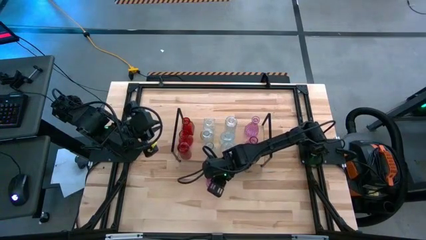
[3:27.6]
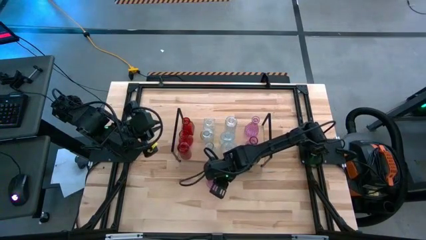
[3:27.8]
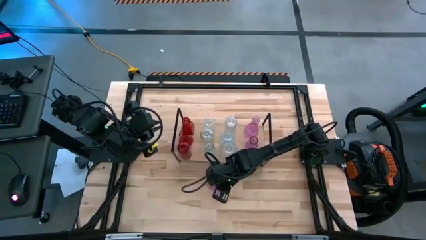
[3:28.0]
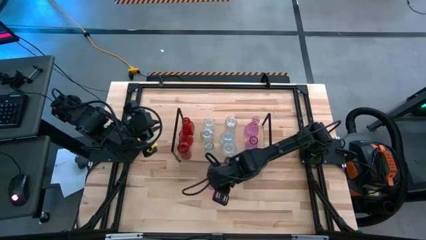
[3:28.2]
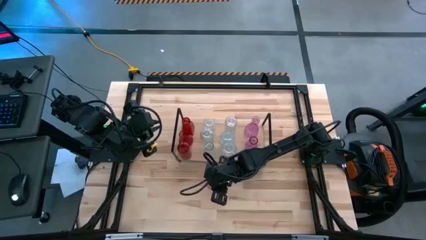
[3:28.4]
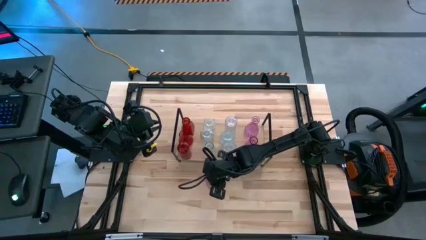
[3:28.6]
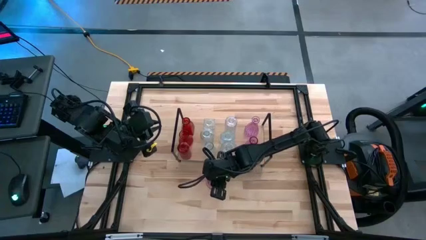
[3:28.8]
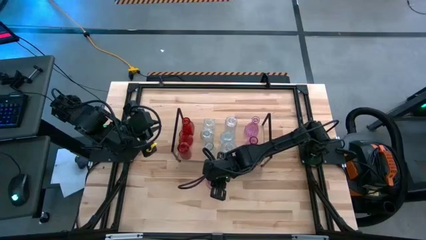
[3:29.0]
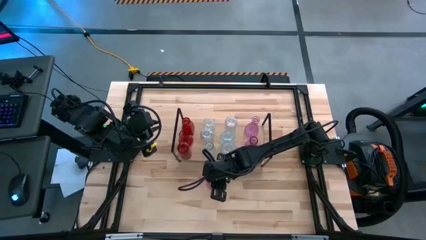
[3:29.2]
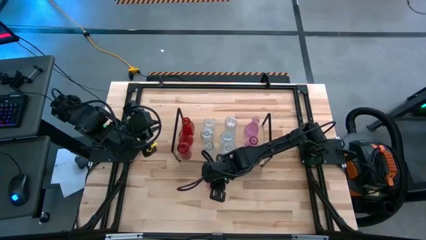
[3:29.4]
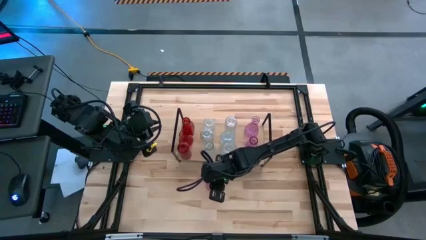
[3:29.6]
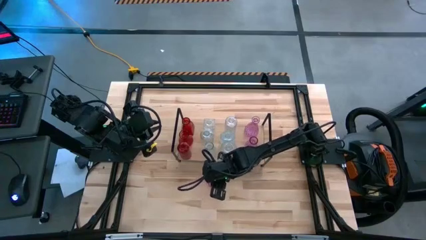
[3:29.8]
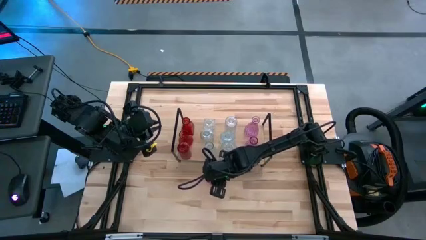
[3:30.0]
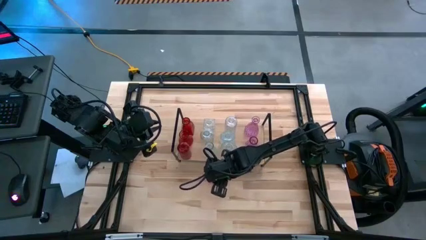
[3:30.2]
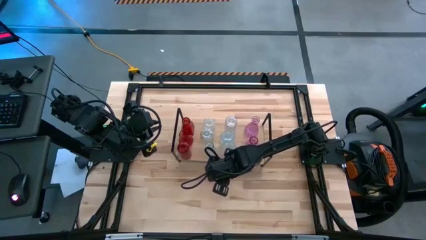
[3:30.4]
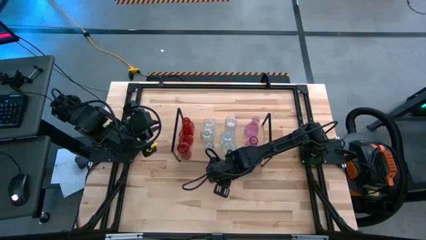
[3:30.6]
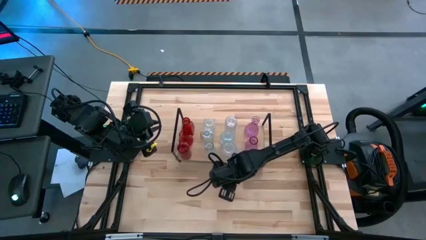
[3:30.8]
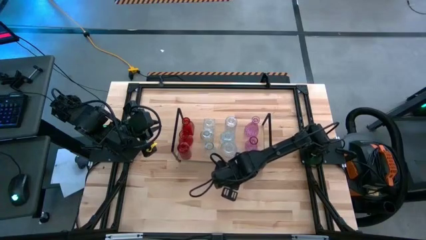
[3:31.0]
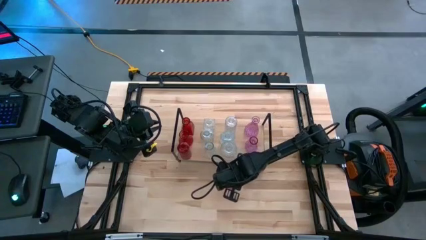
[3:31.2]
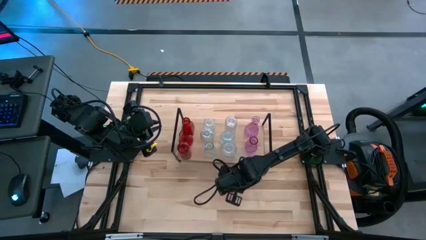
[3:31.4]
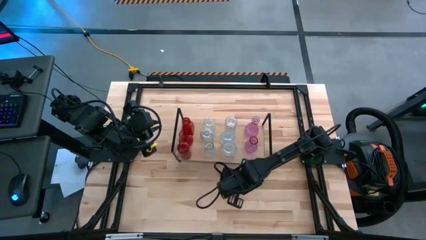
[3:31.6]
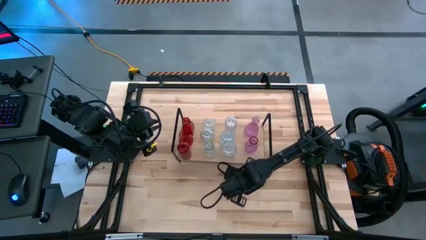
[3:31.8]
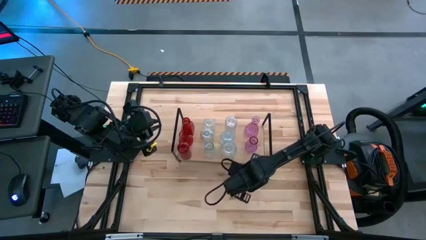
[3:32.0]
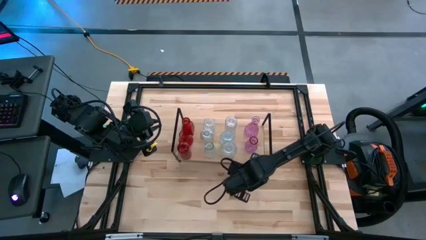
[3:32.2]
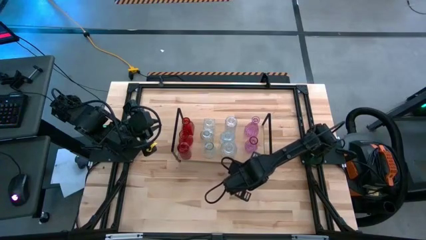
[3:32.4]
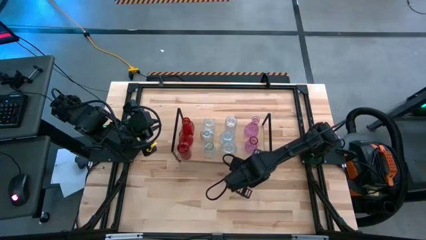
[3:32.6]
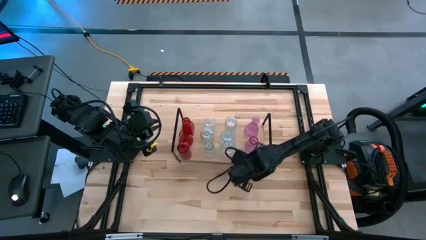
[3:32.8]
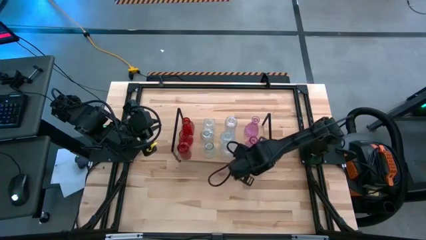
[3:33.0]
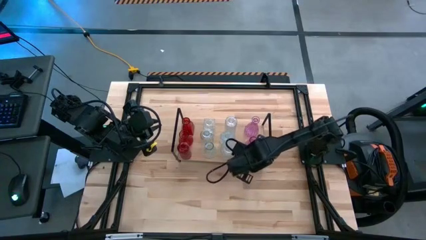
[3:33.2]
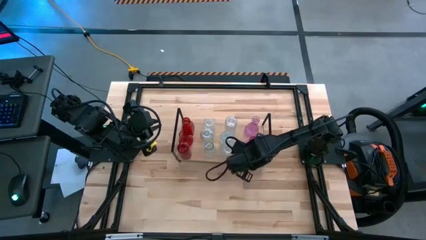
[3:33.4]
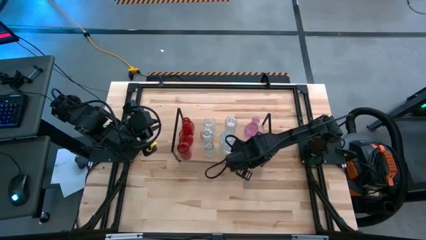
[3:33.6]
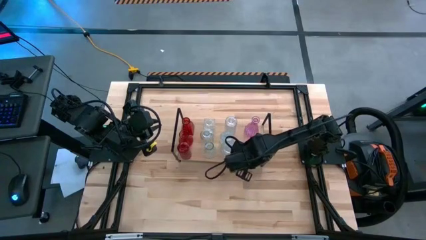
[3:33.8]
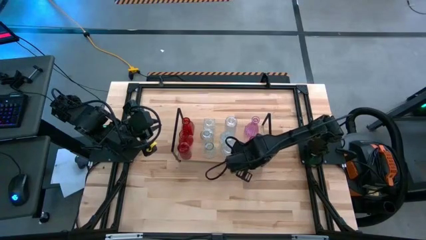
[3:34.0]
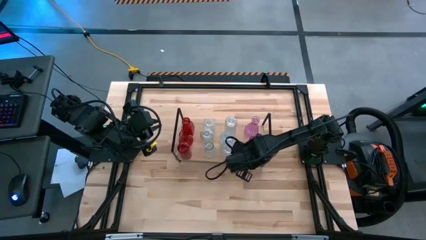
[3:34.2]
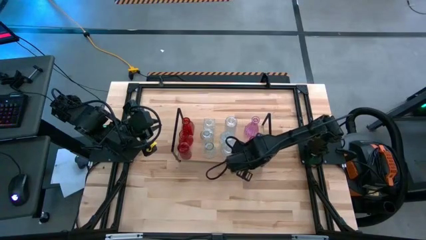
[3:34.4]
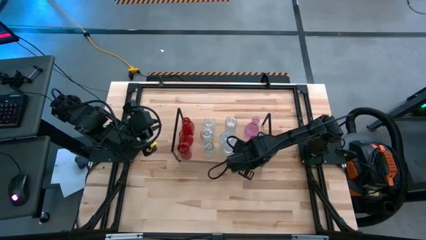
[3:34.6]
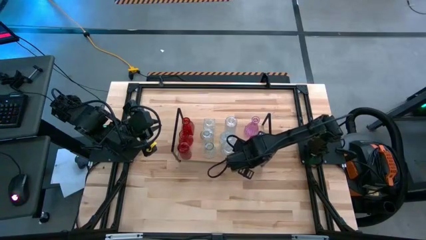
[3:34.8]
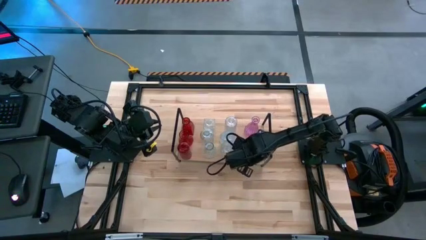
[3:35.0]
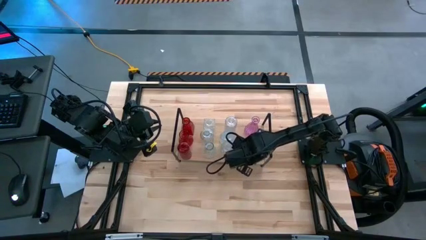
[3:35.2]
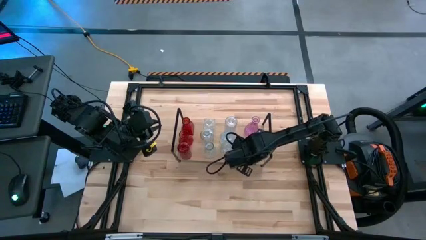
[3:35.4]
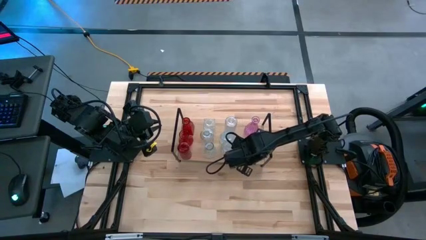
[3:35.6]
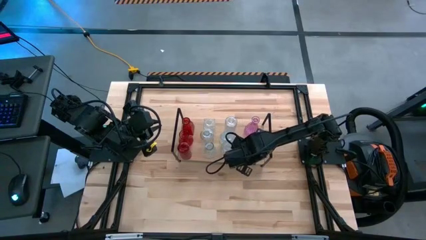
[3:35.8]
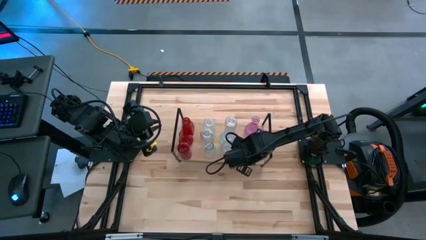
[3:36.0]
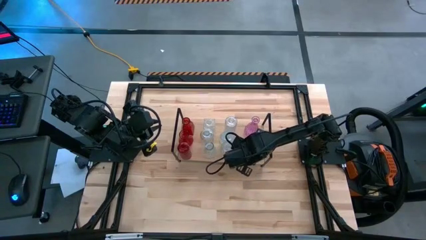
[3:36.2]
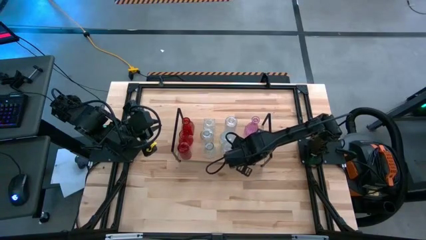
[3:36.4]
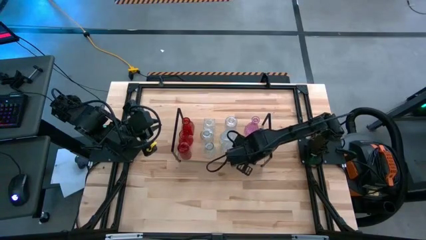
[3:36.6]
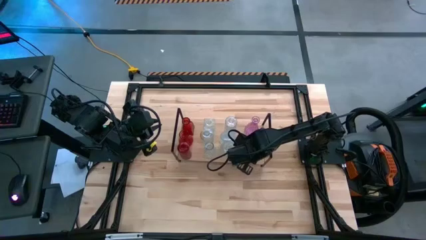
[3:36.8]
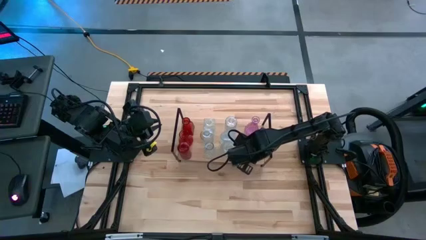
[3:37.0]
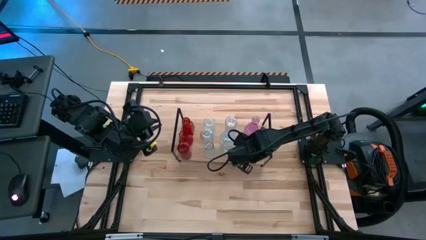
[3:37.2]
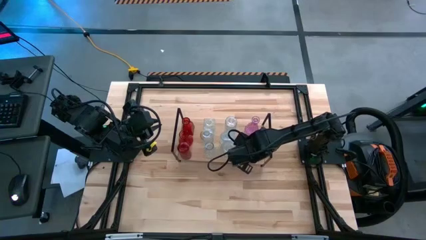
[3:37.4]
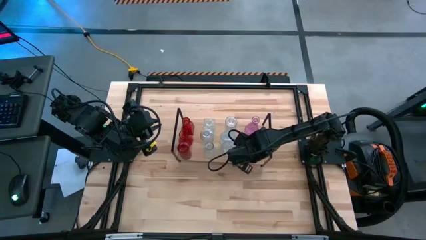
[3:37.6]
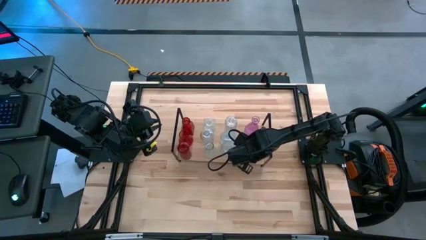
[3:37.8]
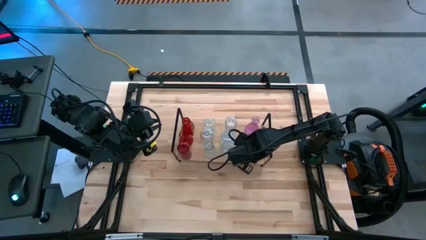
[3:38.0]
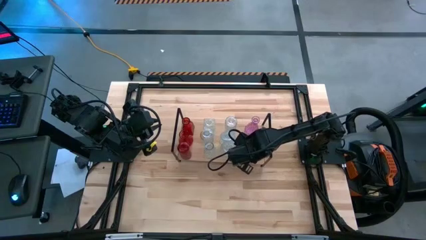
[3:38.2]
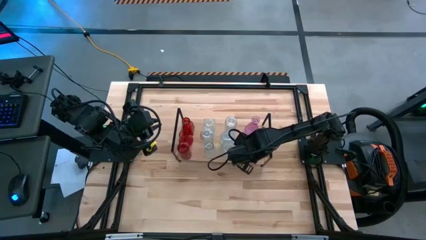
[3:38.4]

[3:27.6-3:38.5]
Task: sort vases onto shelf
Put the transparent vase aligned with the other transparent vase on the shelf

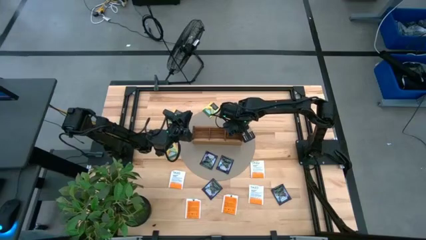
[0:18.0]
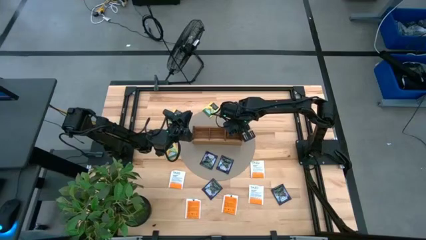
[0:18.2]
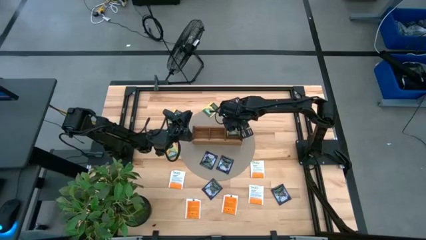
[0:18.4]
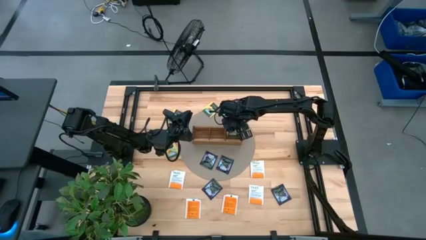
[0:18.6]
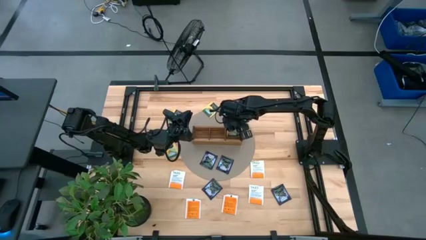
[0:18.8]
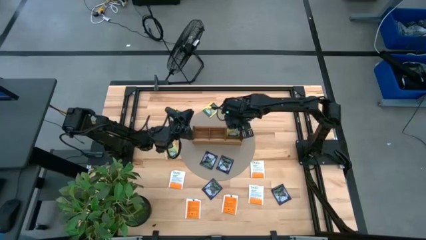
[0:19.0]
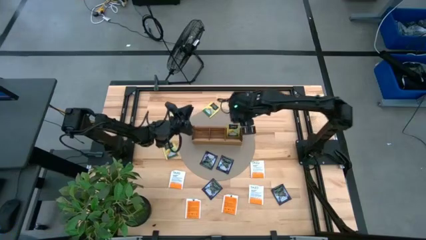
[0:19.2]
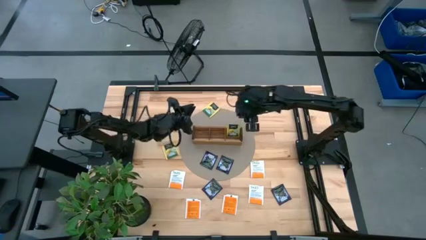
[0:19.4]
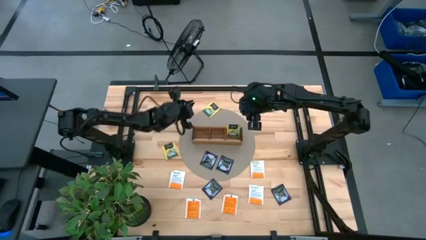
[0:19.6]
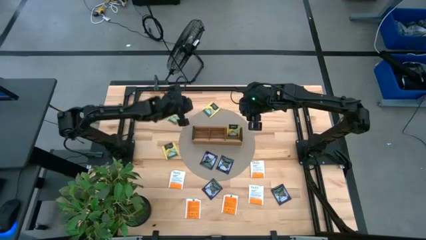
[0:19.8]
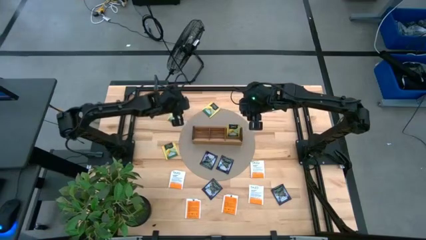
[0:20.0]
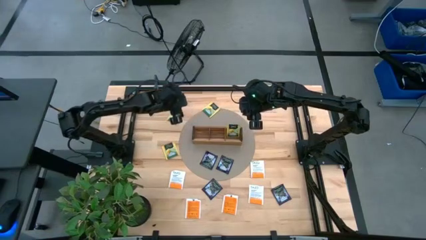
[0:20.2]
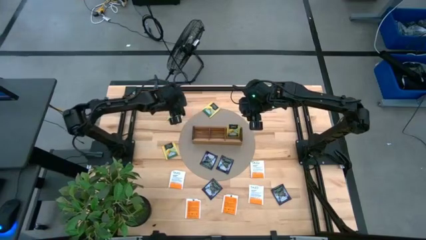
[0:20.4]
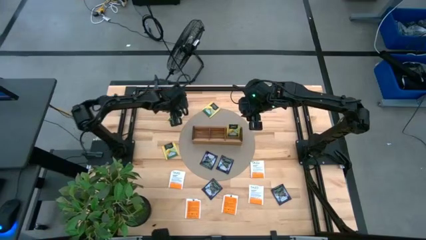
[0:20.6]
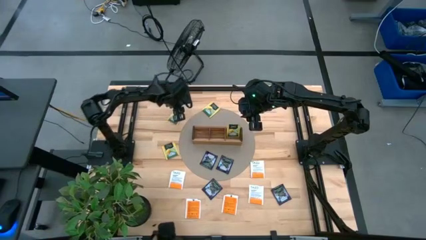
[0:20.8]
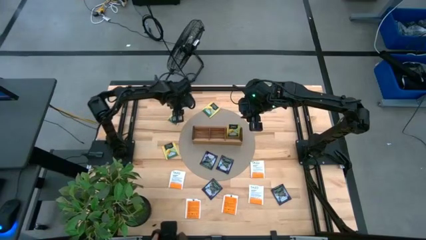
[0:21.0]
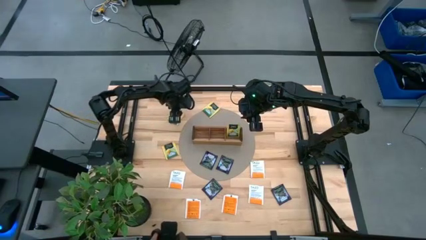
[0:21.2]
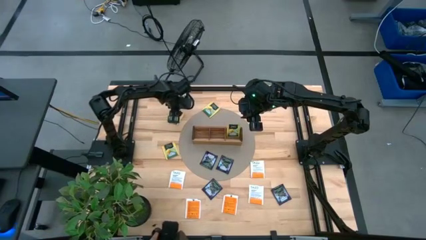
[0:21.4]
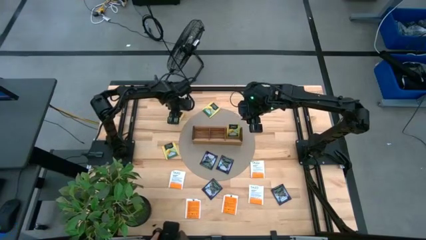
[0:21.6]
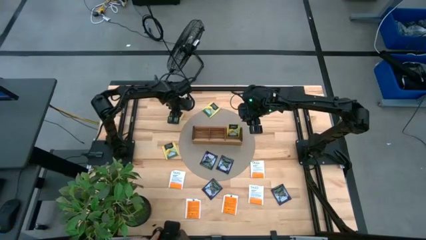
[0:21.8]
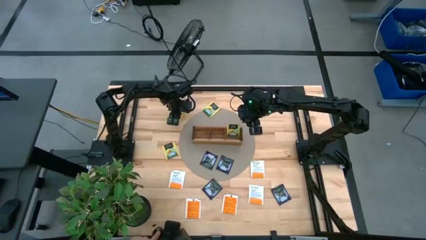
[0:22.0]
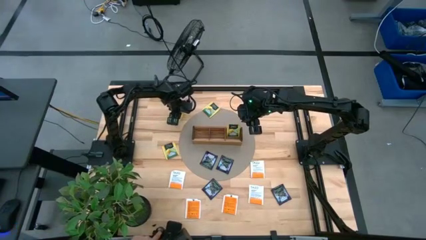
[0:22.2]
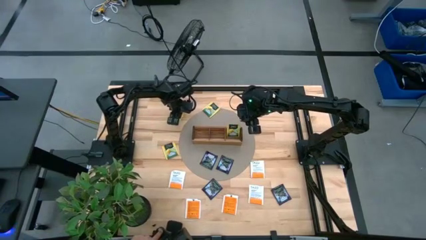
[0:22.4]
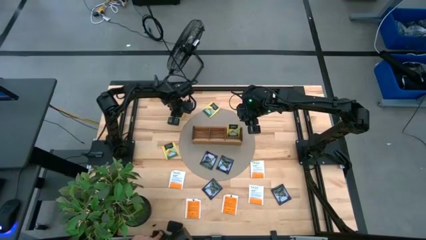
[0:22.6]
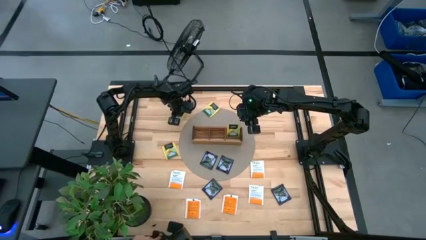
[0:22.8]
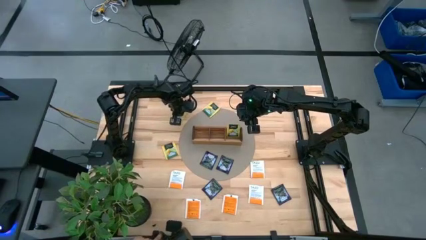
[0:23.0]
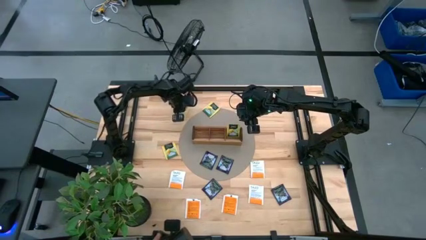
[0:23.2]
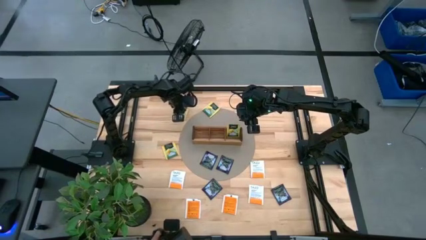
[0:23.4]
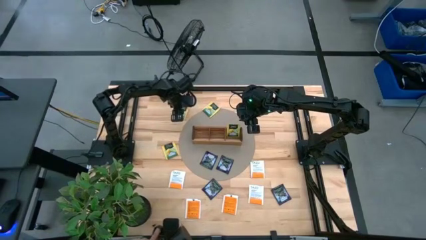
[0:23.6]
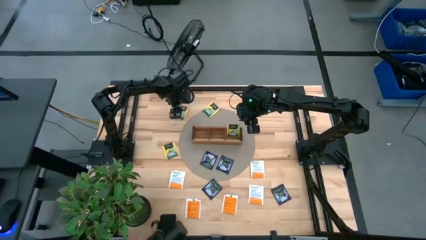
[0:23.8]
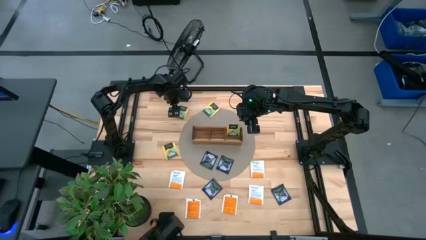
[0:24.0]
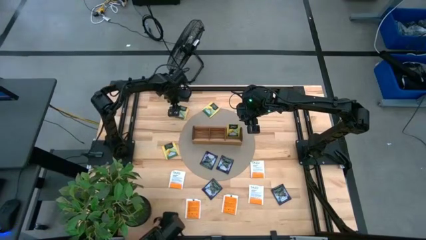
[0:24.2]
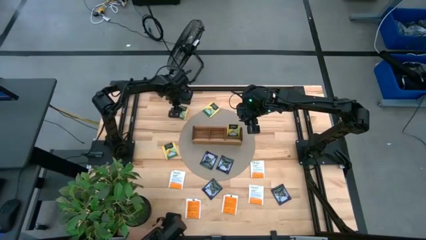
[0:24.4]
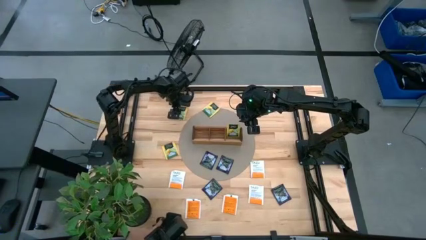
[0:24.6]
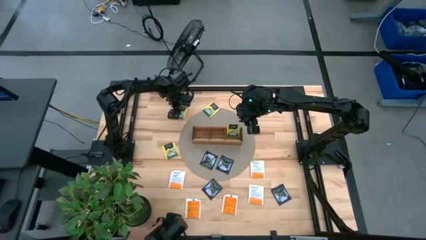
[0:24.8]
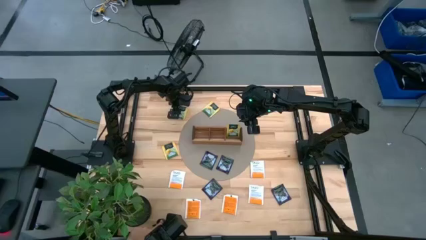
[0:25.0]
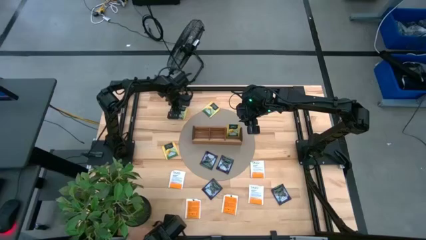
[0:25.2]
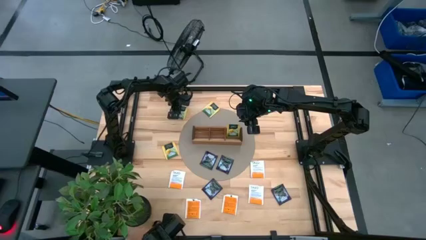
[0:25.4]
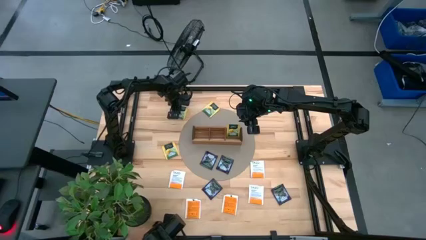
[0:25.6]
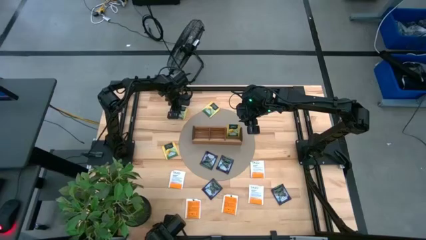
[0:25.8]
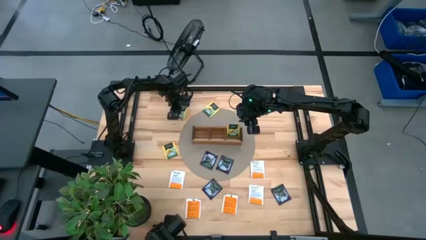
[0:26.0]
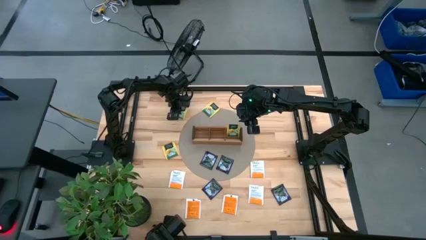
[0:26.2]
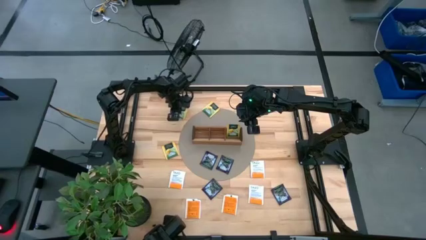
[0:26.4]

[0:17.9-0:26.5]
Task: Pick & Place Tea
Put the yellow tea bag into the right section of the wooden organizer
